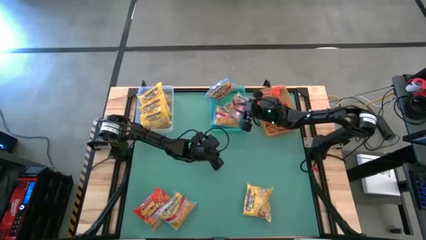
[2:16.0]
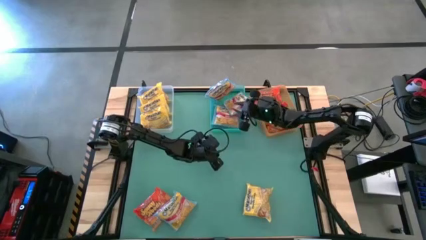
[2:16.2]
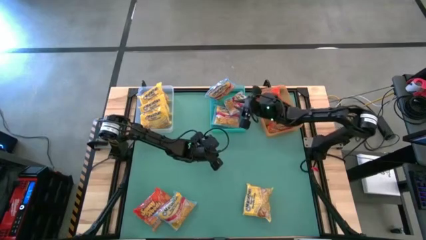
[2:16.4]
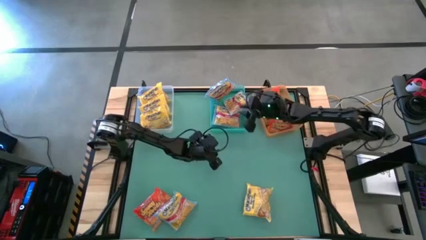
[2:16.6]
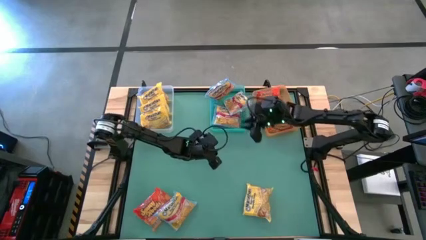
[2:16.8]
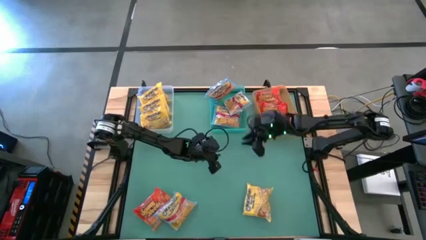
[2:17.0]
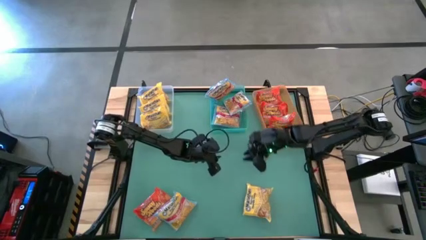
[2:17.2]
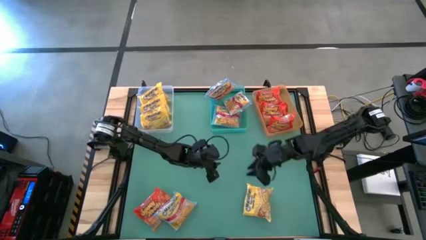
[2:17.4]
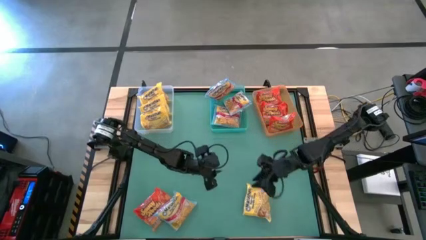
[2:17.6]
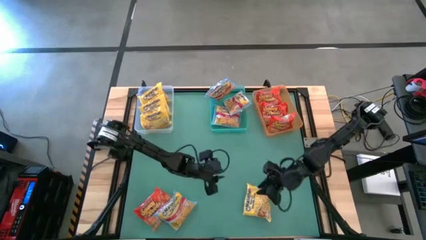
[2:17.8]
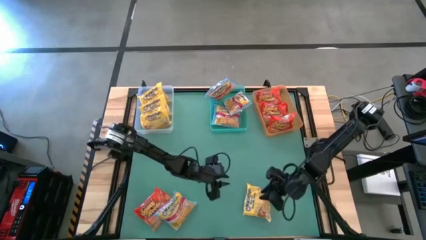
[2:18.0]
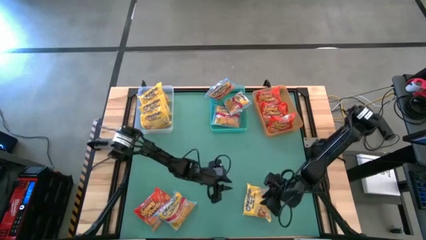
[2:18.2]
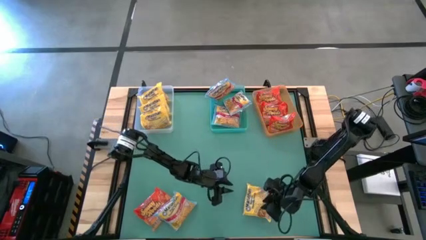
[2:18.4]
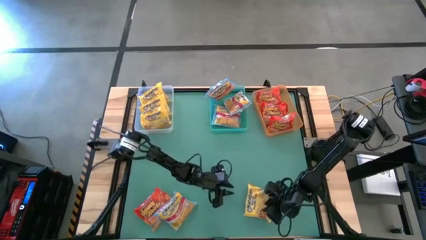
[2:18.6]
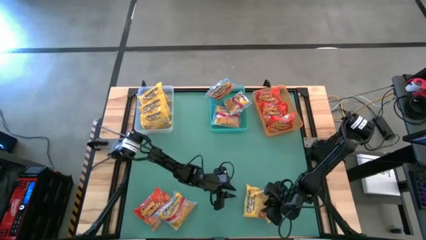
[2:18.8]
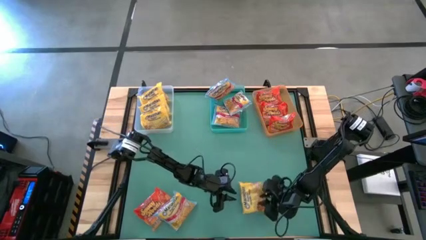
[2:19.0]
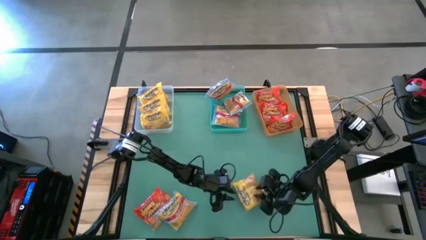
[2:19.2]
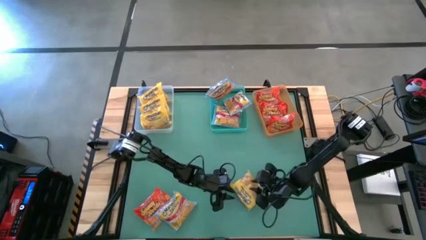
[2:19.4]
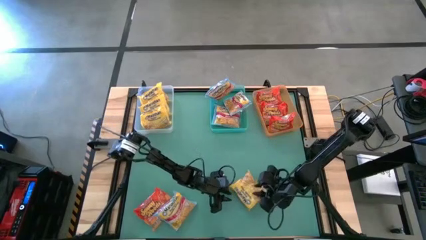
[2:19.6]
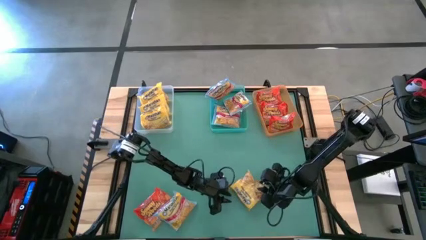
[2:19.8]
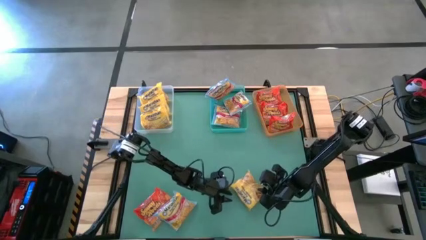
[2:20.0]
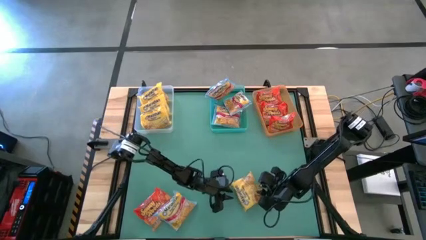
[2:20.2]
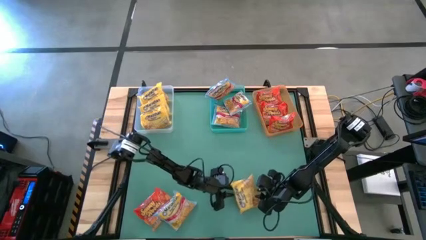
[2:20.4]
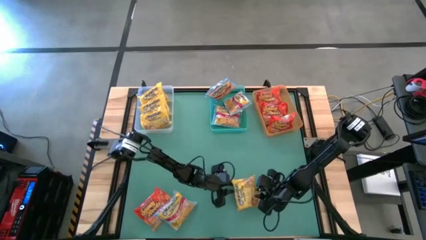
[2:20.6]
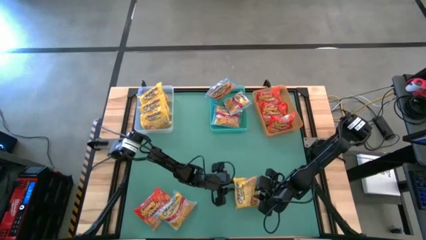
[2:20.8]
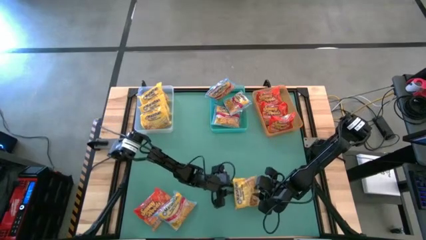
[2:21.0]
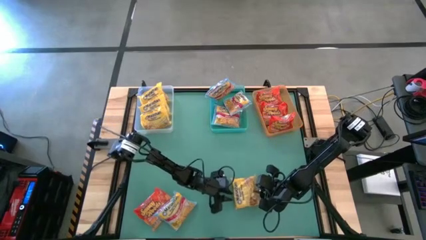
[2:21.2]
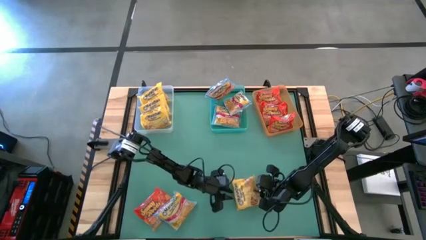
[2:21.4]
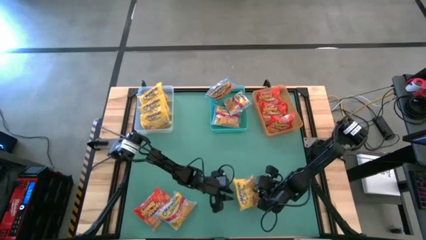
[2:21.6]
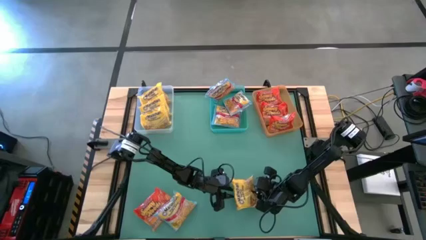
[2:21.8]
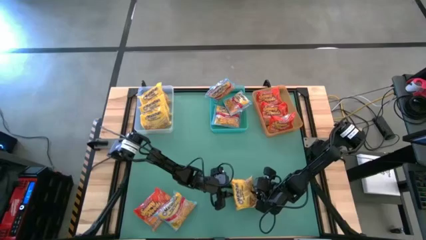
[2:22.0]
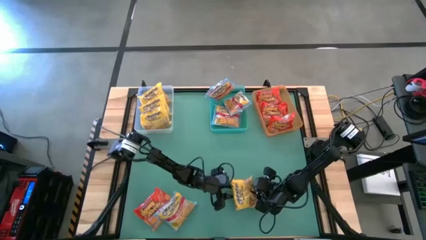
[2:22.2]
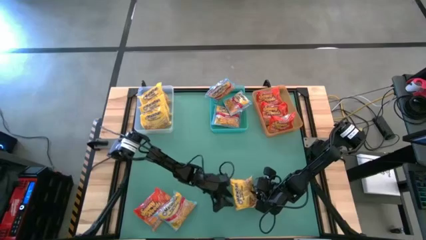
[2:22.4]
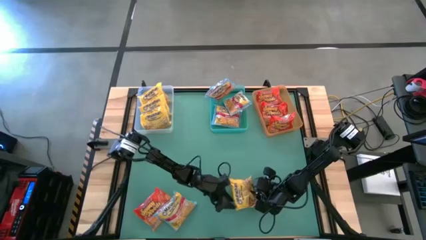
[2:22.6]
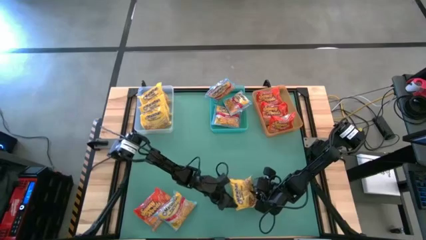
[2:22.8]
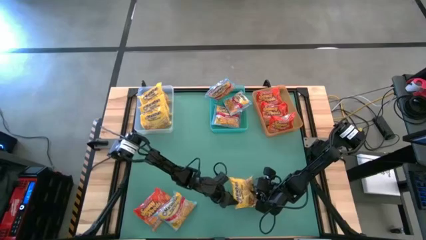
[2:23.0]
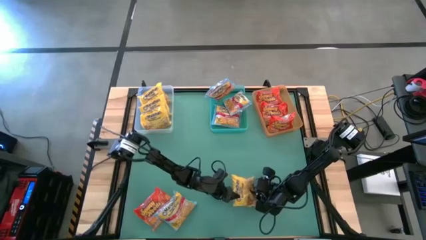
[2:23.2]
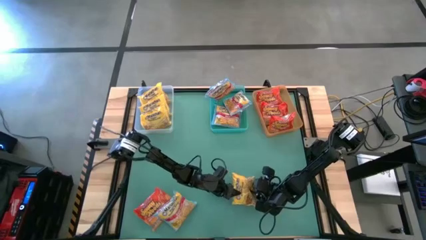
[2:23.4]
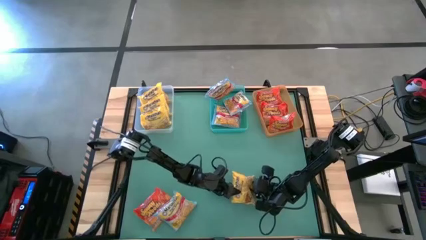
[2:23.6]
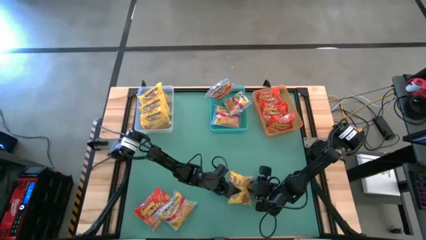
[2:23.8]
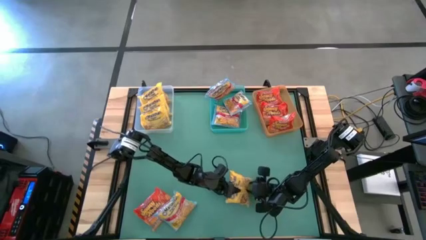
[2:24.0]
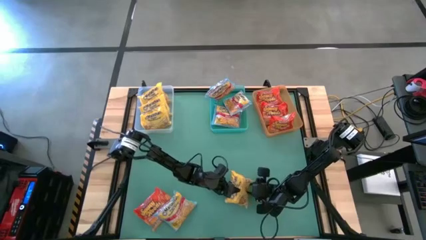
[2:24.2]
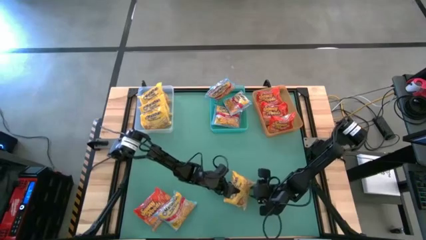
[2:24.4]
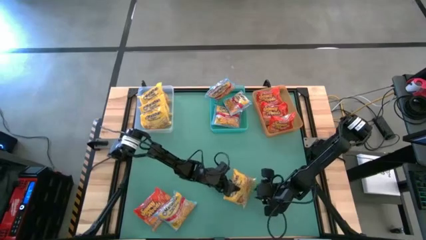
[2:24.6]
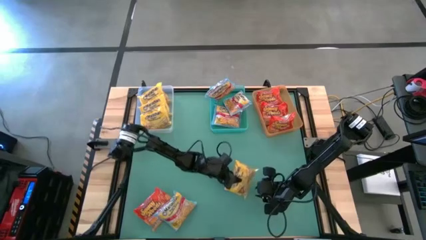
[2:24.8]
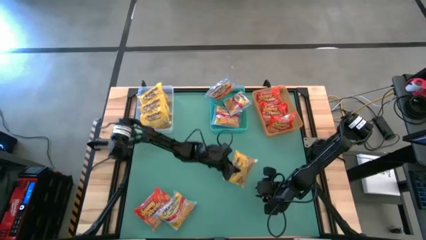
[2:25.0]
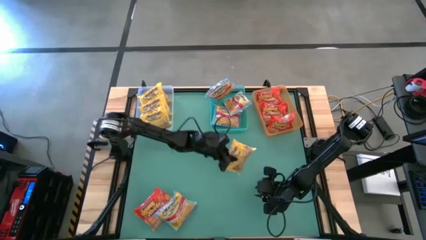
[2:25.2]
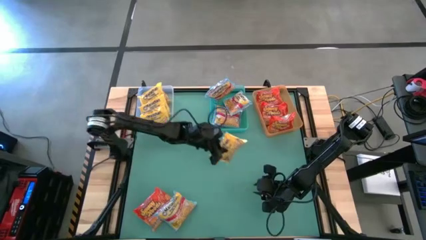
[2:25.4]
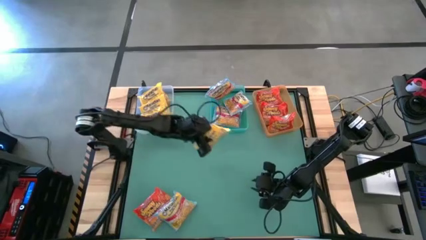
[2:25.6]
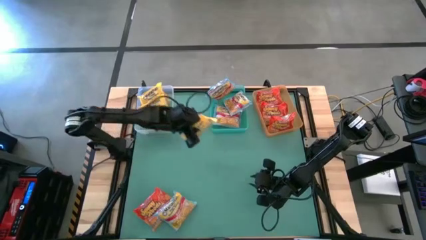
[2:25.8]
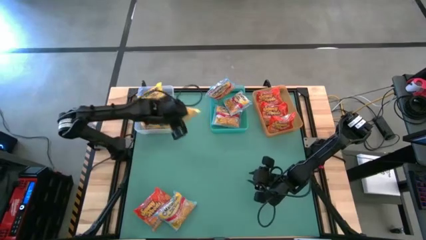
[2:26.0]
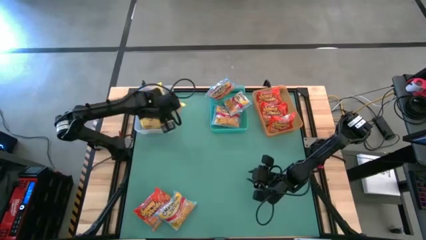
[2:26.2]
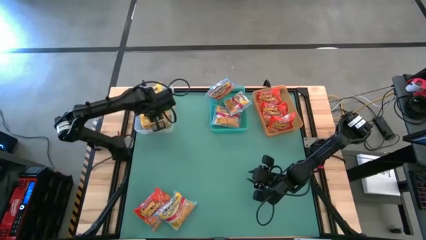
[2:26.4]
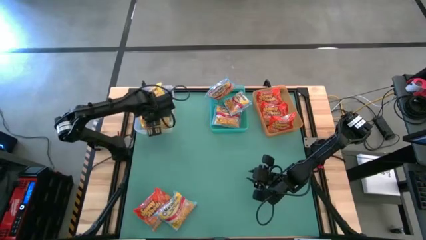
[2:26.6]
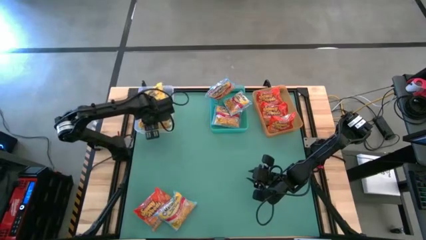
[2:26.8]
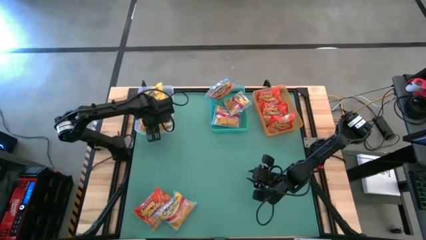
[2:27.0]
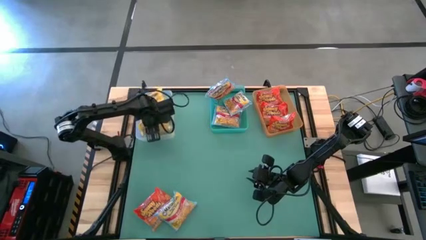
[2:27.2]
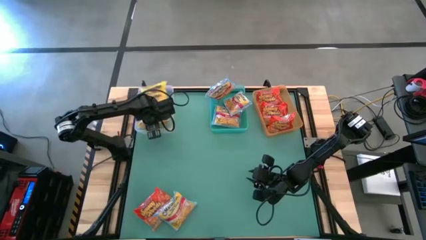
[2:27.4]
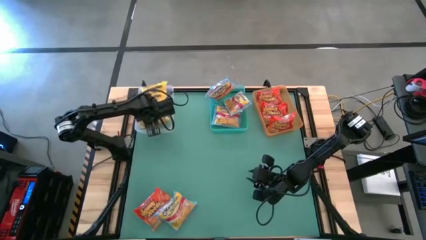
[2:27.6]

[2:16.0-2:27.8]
Task: Sort Maruchan noodles
Put the yellow noodle pack into the white bin
